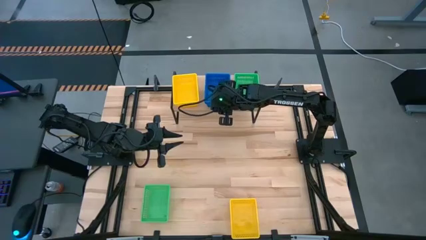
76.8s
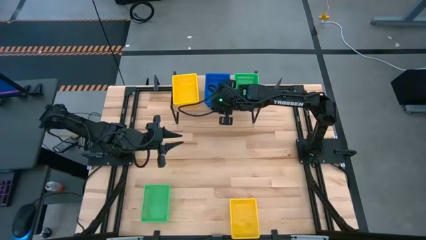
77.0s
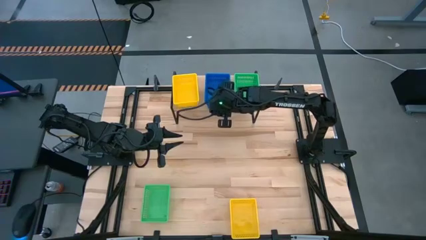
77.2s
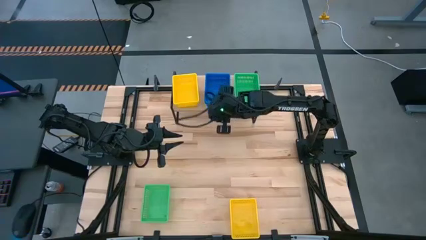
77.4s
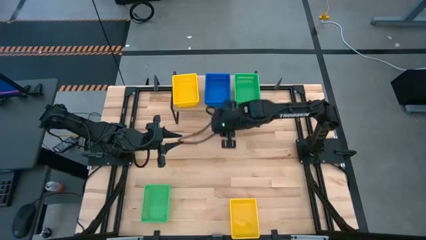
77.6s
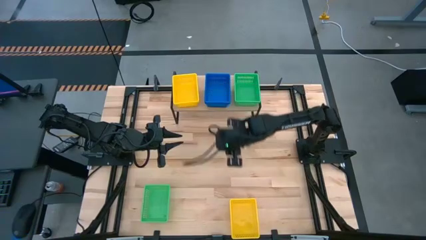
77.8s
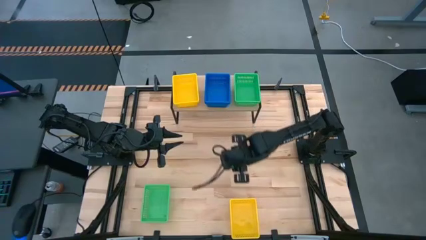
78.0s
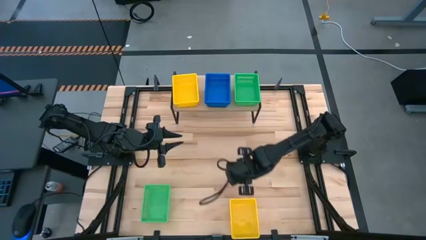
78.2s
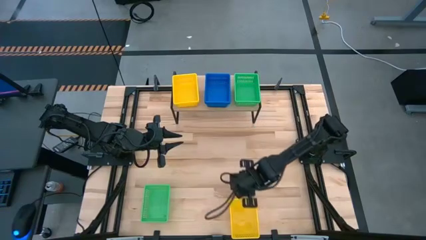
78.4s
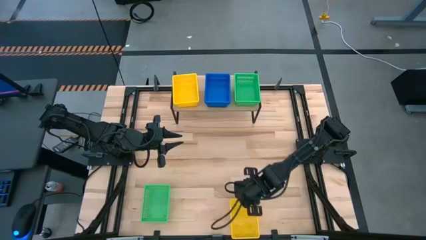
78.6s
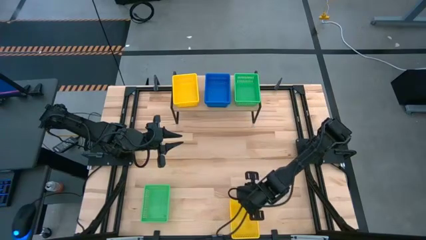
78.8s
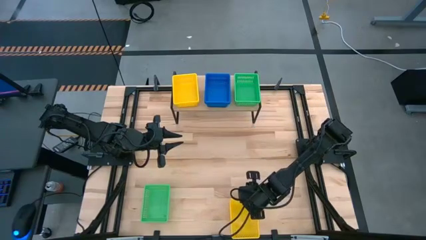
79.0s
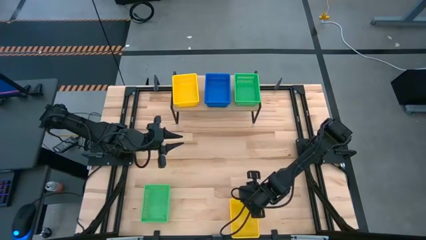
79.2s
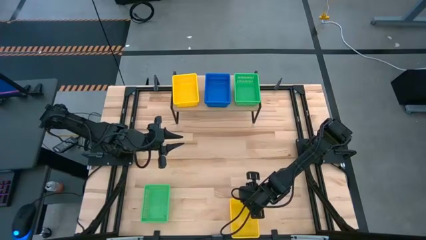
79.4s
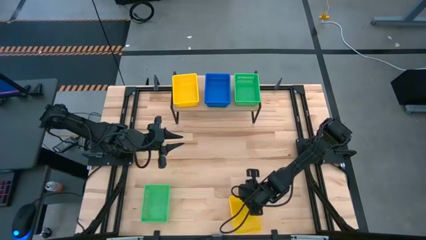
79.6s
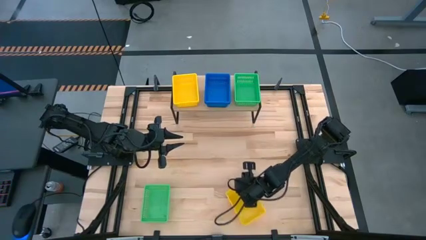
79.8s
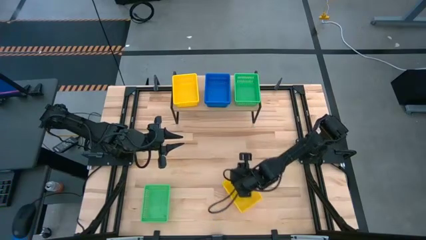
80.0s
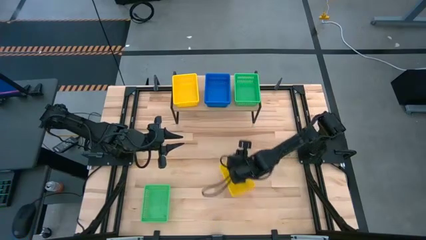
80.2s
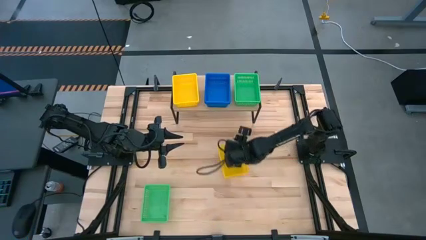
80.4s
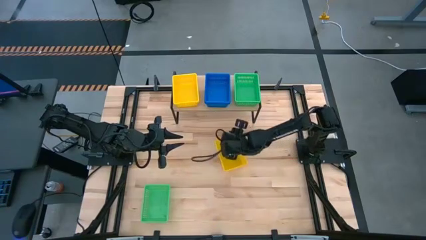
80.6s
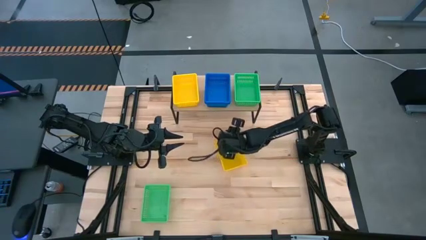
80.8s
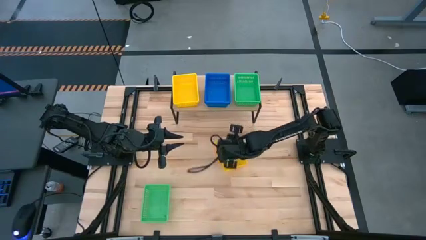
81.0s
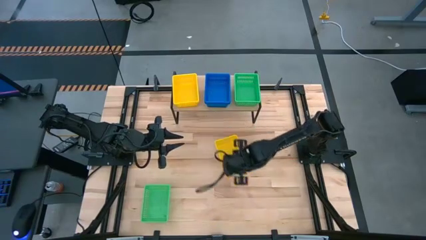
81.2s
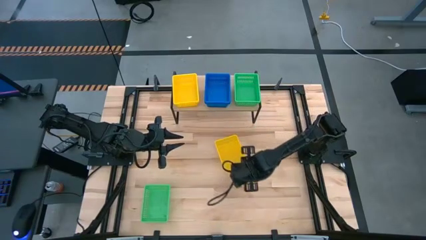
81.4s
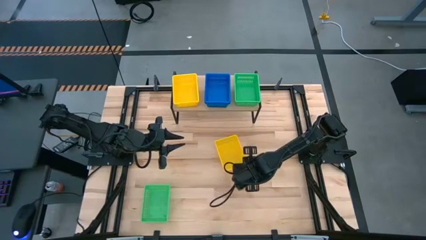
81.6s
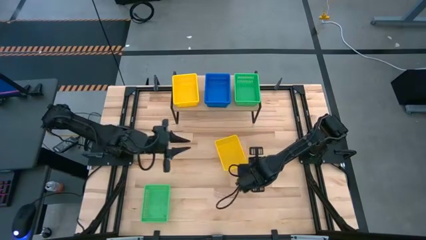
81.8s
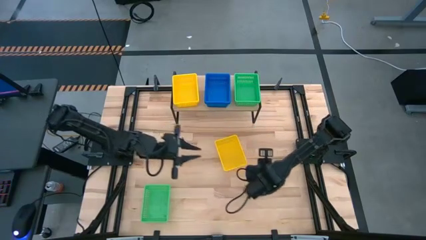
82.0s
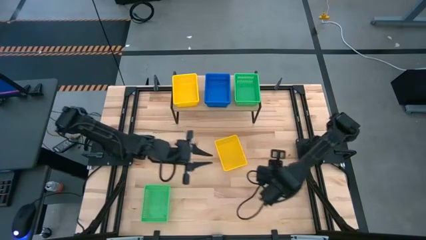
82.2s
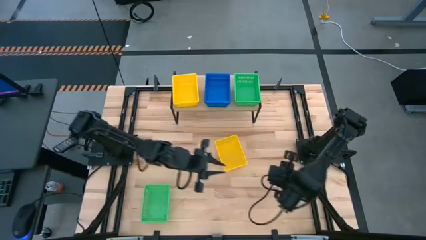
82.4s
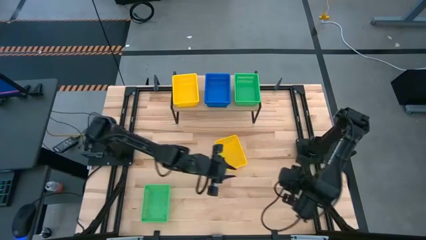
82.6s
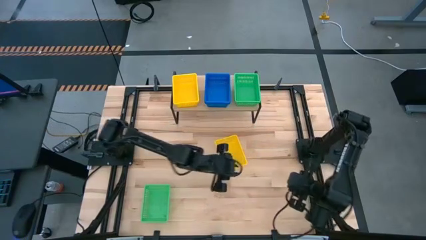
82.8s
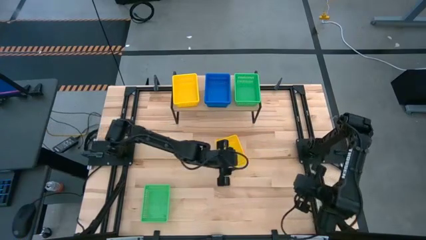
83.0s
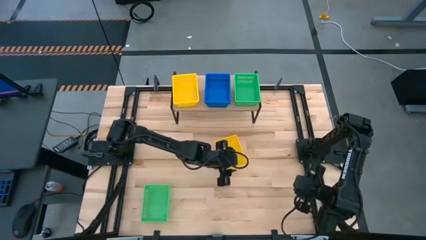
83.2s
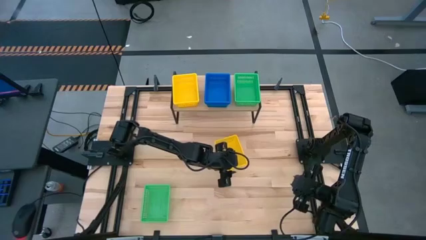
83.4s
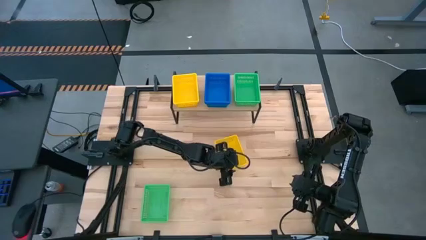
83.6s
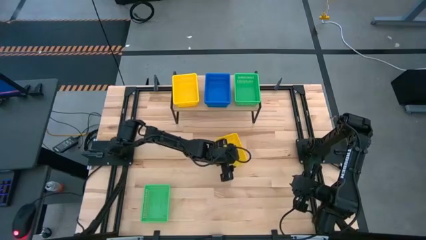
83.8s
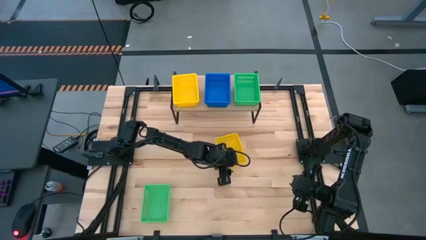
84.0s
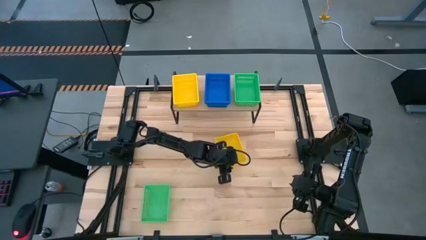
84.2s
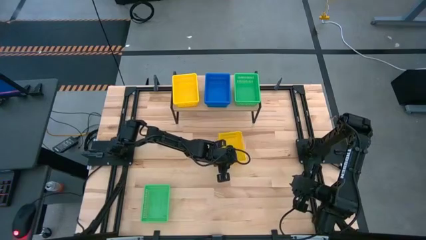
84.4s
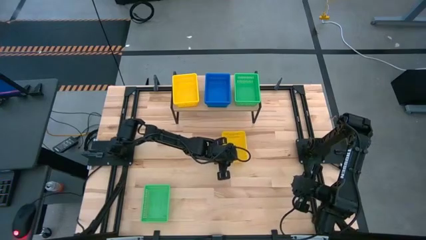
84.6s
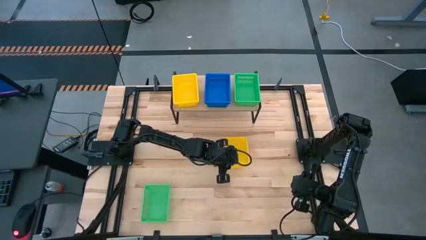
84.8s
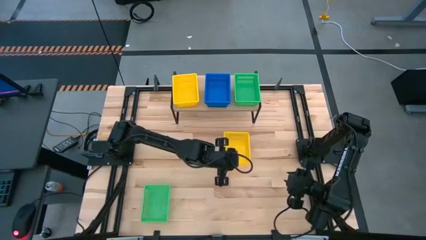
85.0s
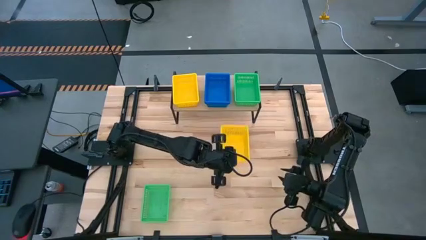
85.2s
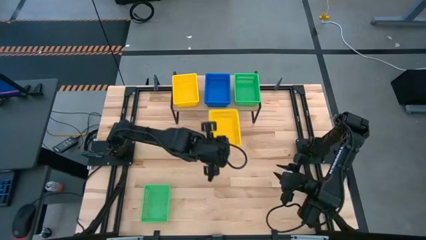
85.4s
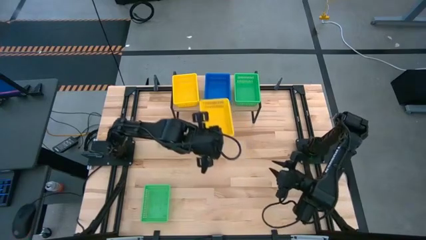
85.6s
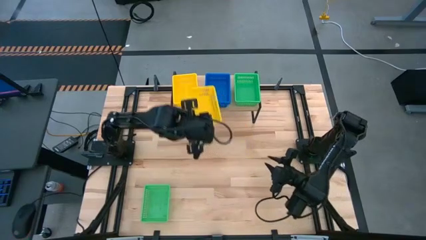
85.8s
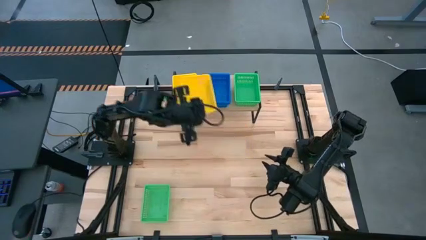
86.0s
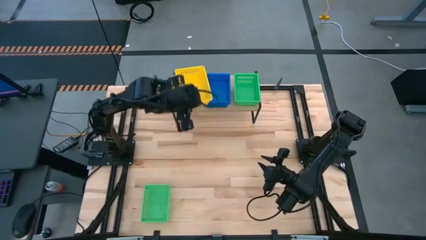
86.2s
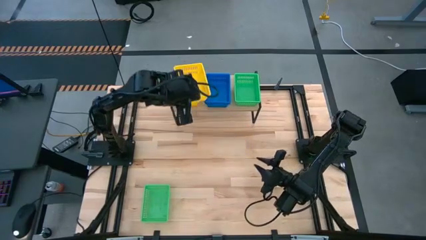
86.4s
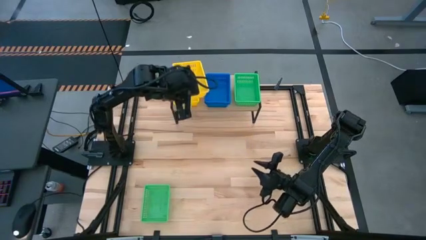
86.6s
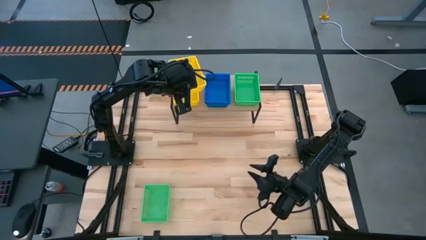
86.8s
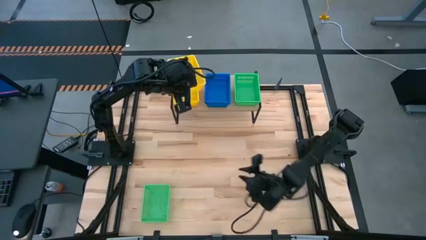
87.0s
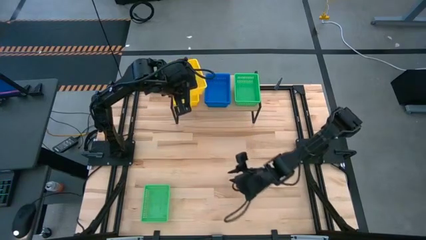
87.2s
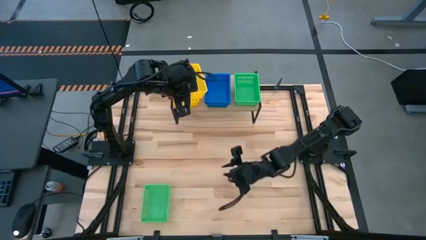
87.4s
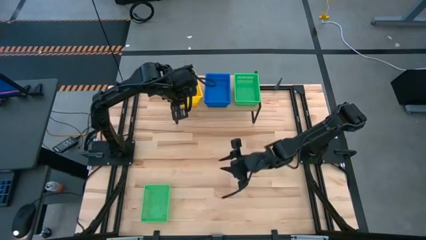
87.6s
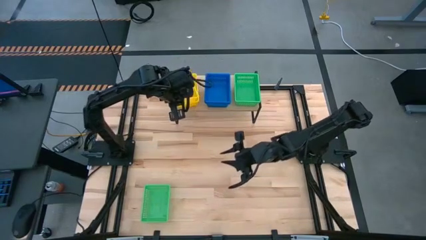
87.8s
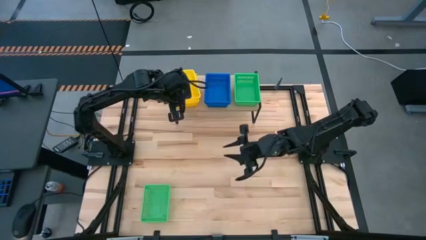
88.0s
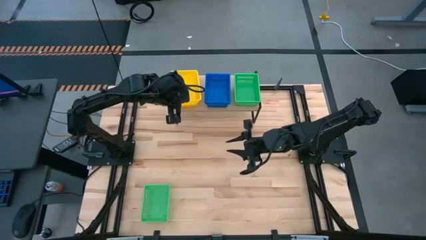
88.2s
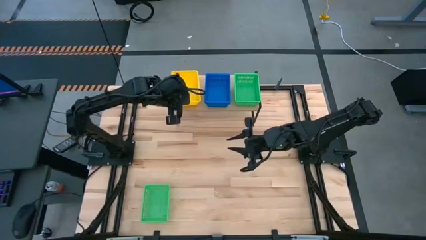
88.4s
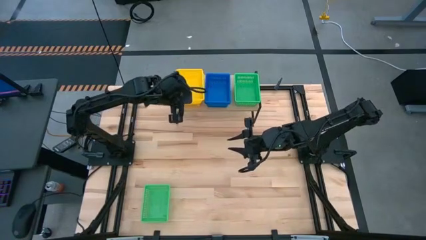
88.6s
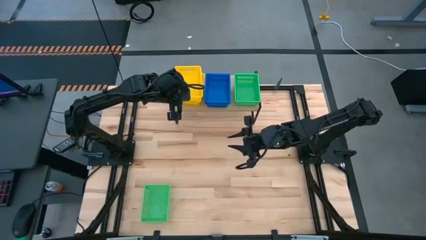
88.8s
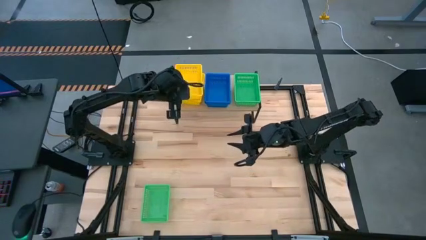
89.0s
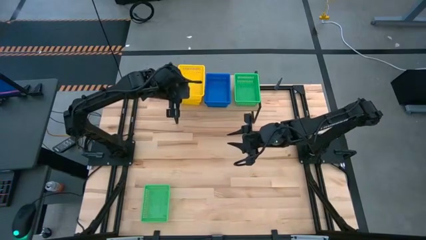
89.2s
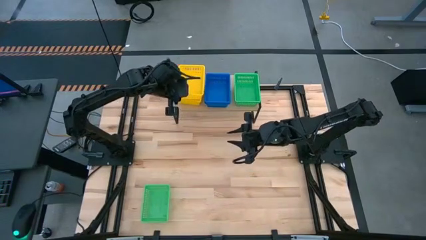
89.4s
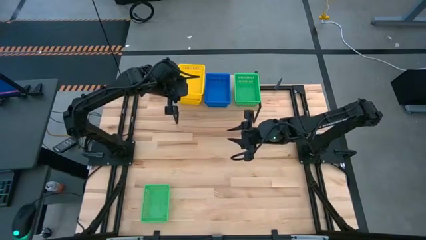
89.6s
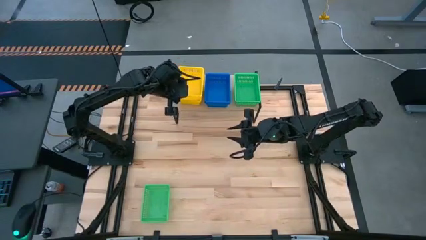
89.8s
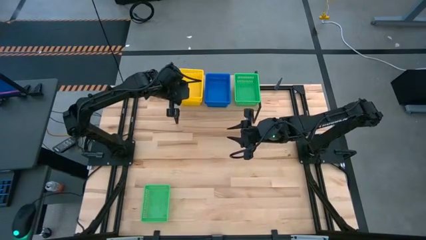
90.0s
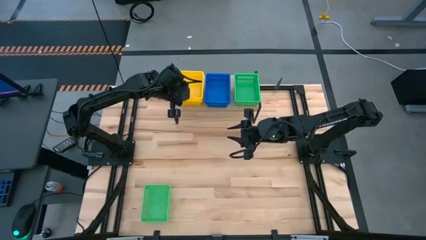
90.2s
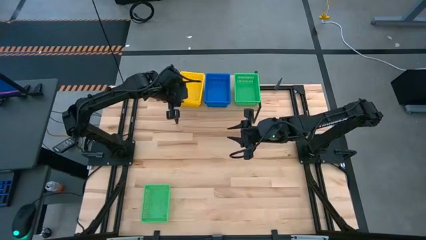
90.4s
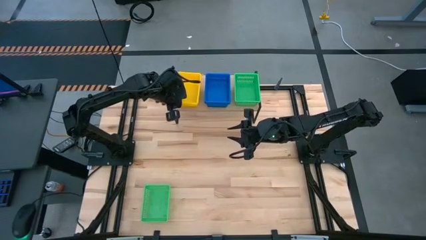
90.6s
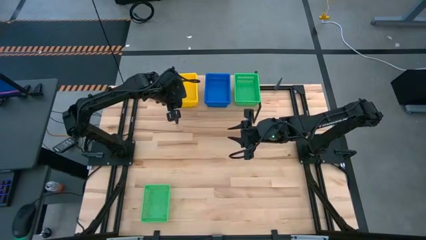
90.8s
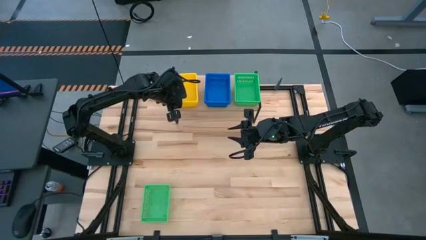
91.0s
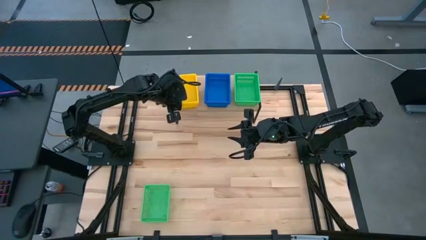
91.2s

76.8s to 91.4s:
Task: Stack baskets on shelf by color
Stack the yellow basket on the other yellow baskets on the shelf

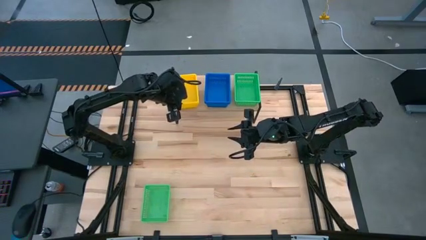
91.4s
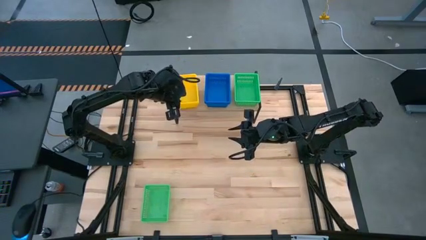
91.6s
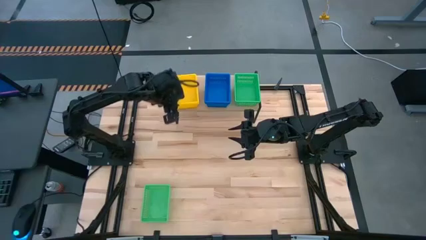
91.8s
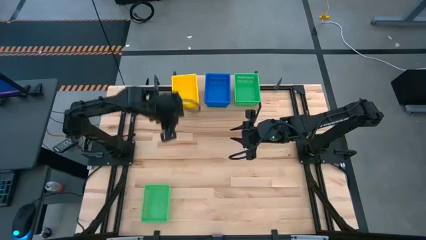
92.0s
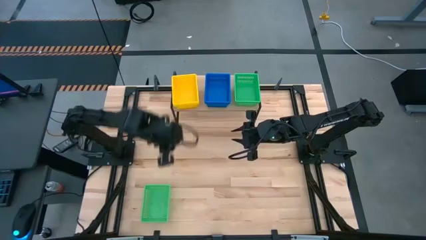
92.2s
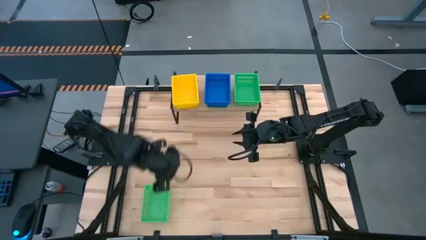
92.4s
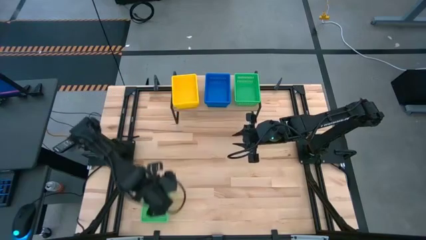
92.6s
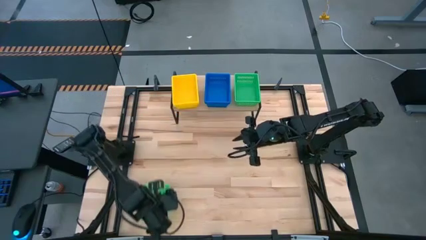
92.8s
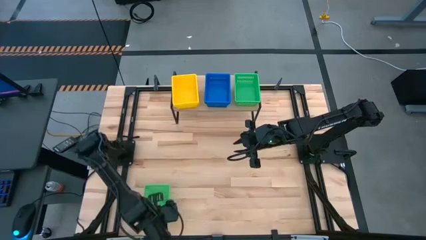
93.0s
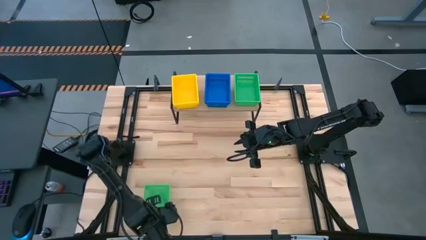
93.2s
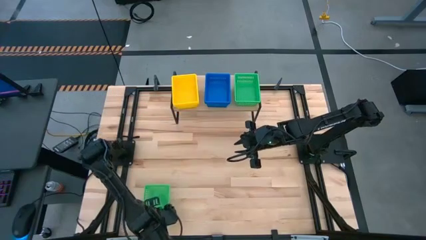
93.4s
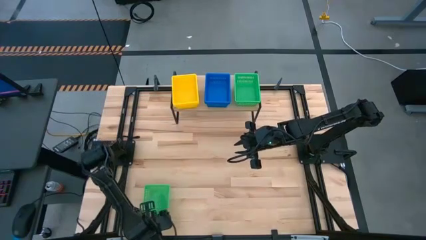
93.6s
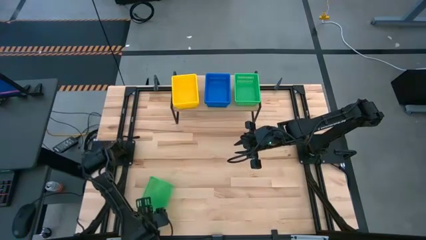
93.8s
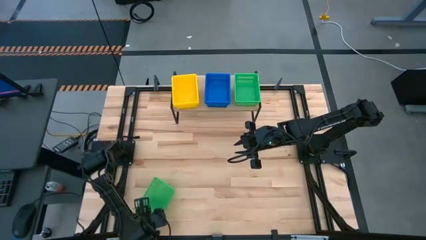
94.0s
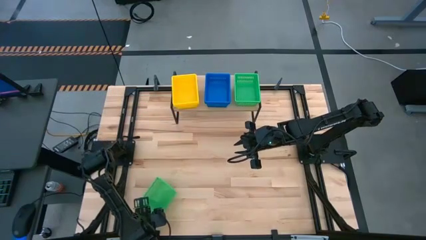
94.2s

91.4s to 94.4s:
Stack the green basket on the other green baskets on the shelf
